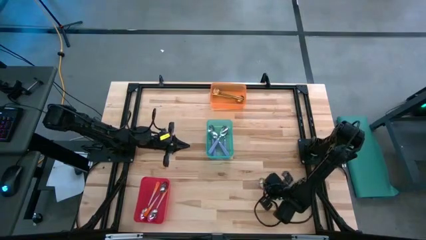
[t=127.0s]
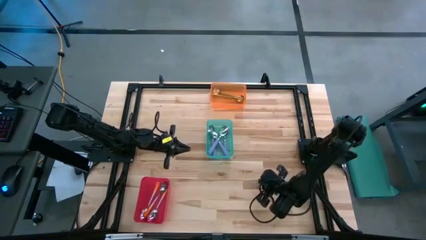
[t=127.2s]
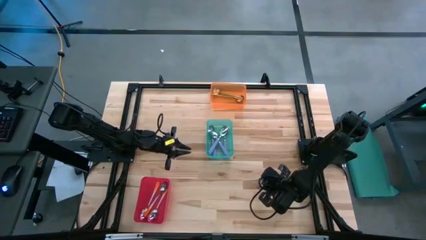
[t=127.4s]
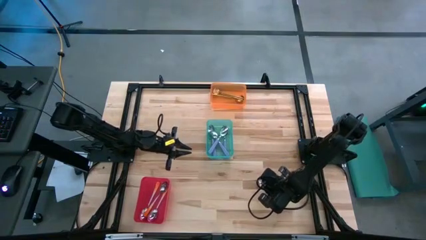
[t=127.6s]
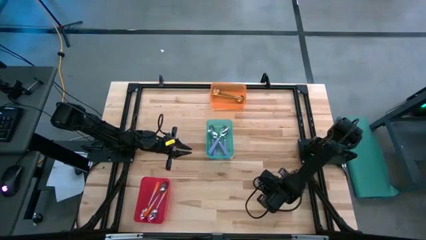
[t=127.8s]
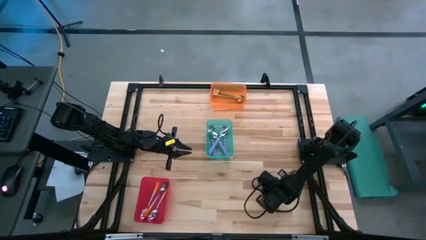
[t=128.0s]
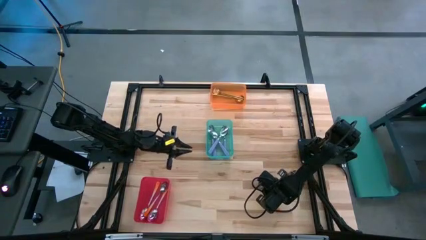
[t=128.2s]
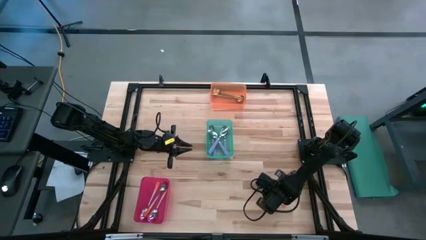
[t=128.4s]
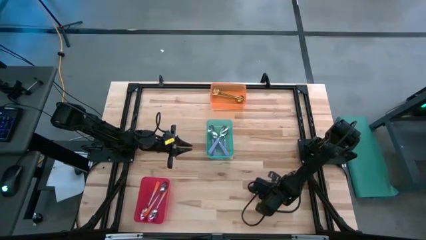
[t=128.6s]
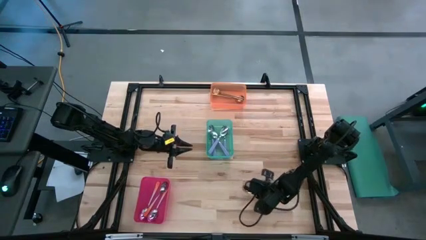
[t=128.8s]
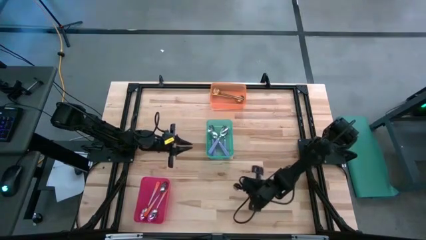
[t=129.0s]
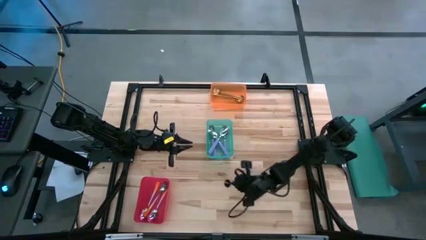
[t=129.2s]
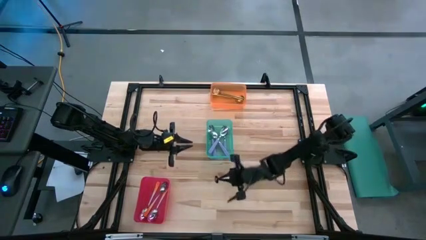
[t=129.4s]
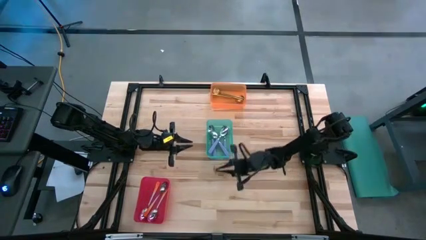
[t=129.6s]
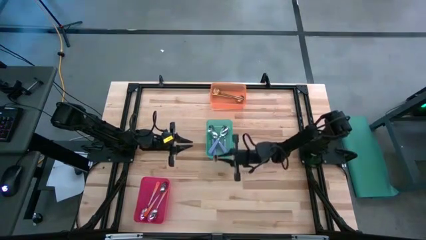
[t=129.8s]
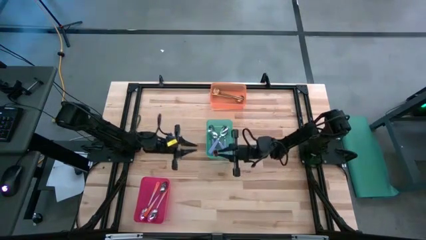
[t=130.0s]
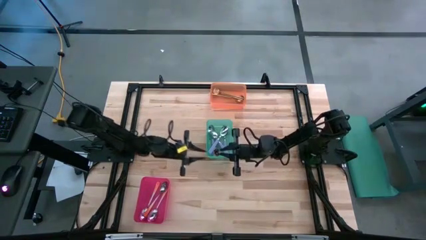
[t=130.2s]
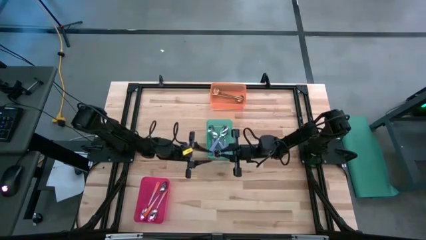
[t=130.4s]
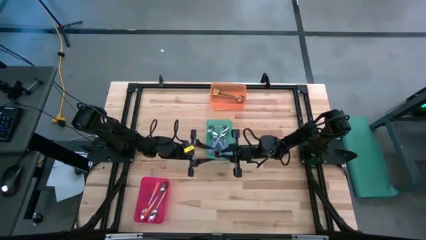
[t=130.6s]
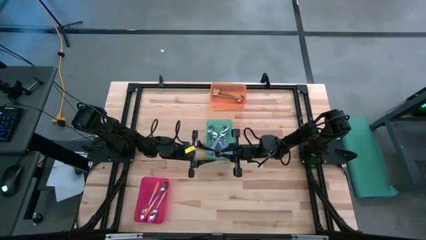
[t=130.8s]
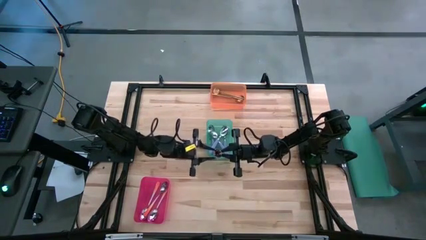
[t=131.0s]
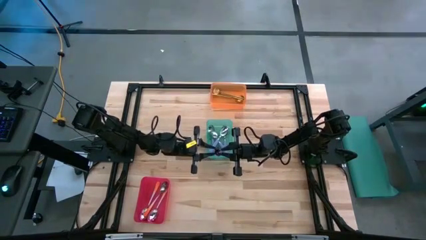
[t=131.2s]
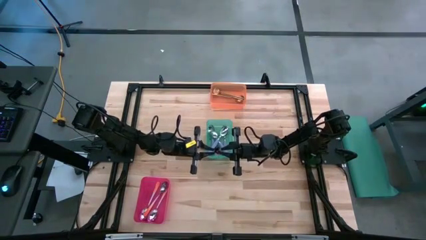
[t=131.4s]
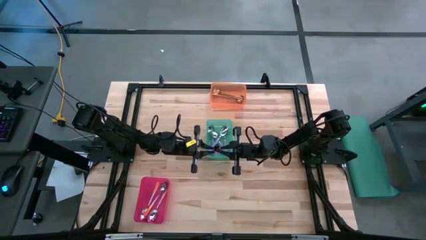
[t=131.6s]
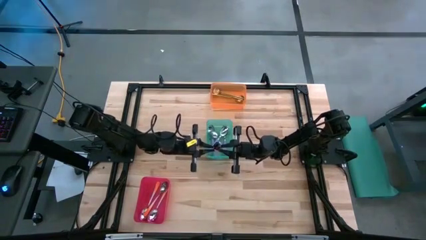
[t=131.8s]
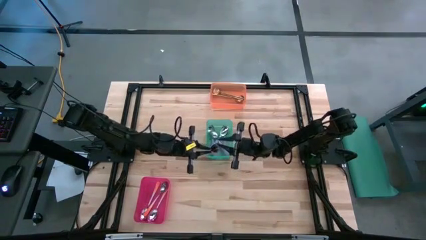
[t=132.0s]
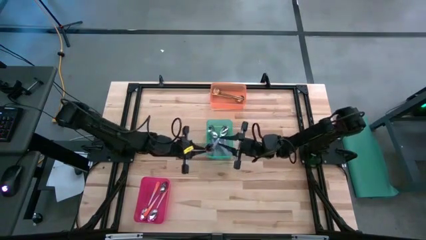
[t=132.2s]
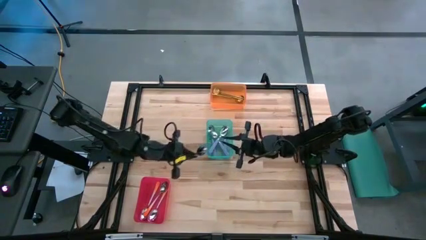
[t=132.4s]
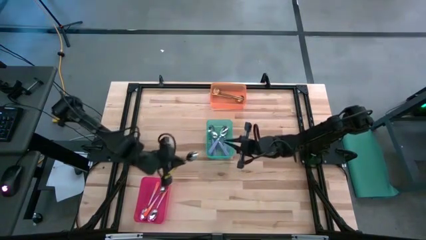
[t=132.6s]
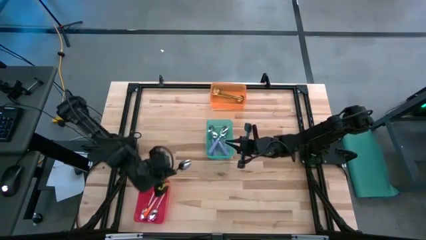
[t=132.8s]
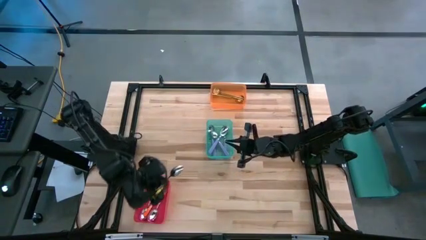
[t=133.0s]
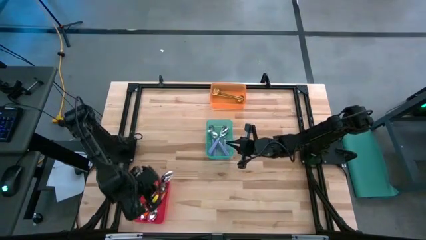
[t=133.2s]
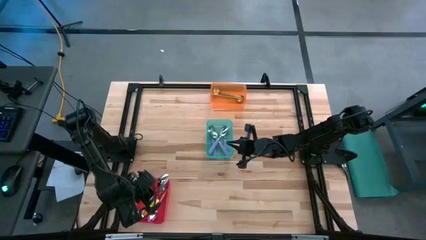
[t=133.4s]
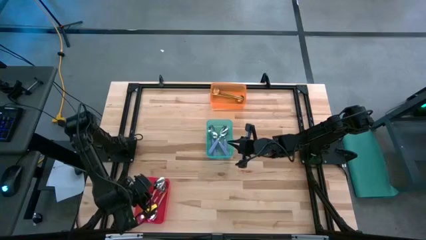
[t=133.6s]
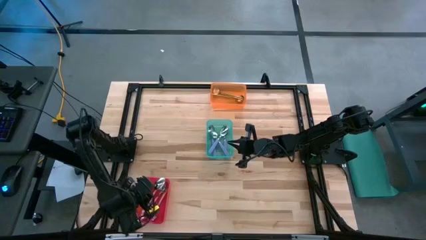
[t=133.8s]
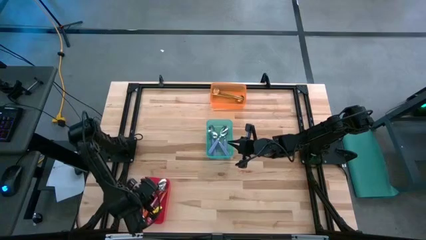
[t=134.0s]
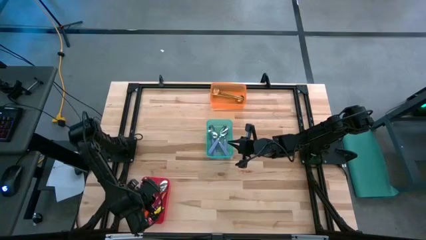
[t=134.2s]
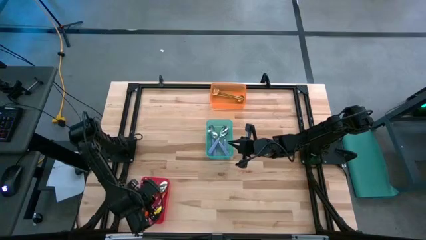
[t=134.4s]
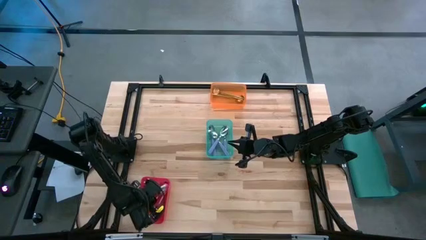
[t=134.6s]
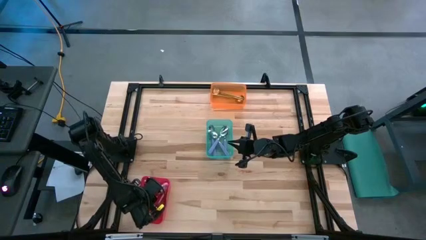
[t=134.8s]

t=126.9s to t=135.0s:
Task: Sort silverware by color (type)
Put the orange spoon into the red bin

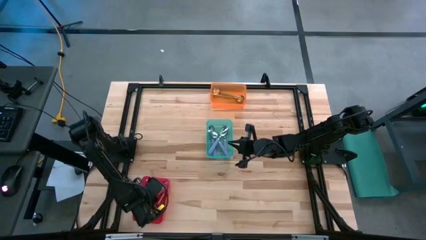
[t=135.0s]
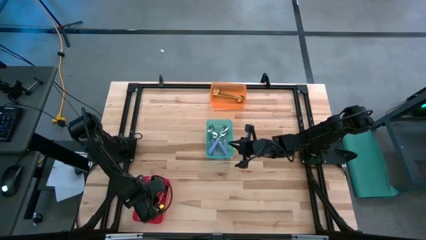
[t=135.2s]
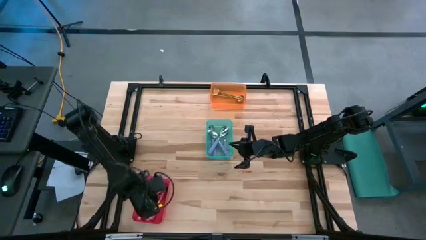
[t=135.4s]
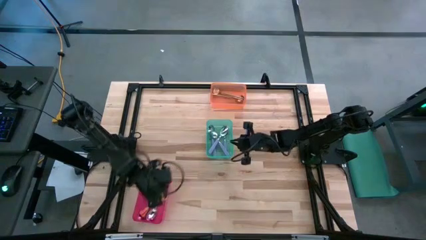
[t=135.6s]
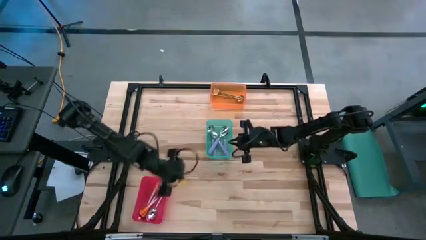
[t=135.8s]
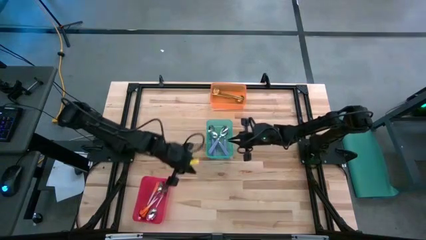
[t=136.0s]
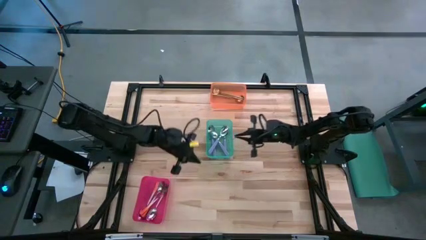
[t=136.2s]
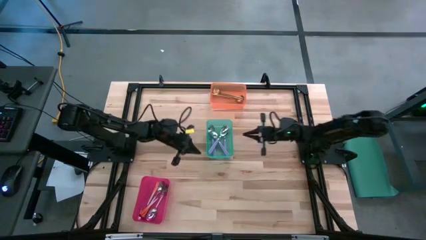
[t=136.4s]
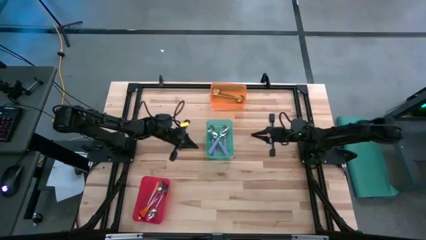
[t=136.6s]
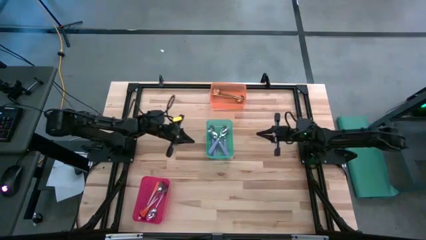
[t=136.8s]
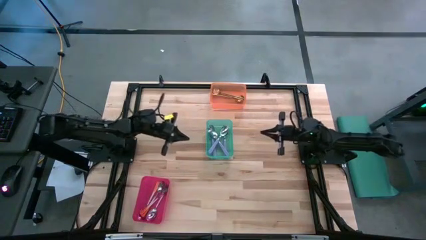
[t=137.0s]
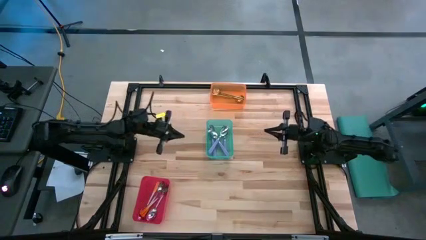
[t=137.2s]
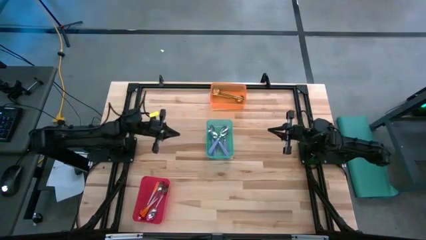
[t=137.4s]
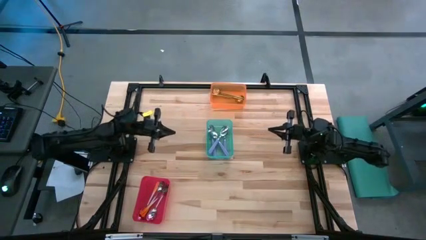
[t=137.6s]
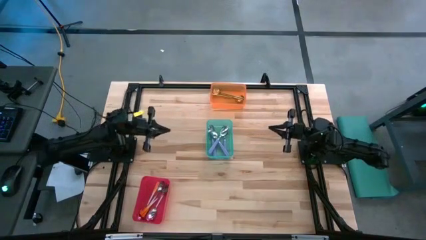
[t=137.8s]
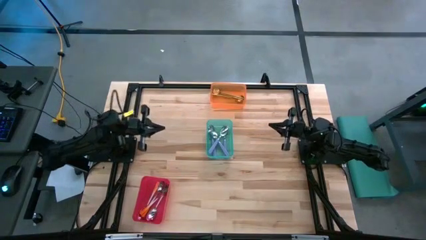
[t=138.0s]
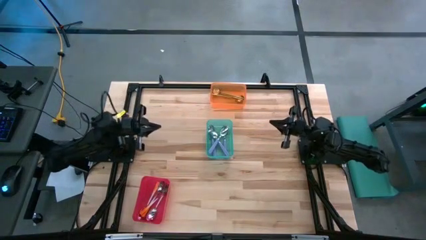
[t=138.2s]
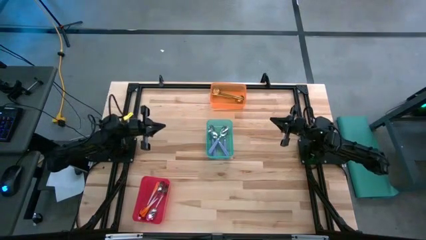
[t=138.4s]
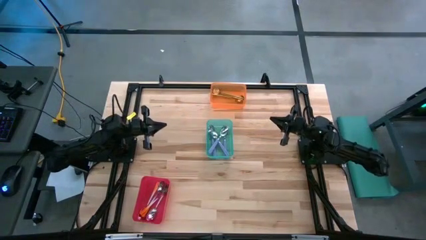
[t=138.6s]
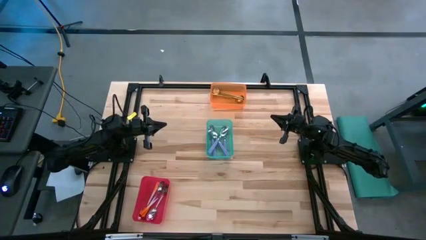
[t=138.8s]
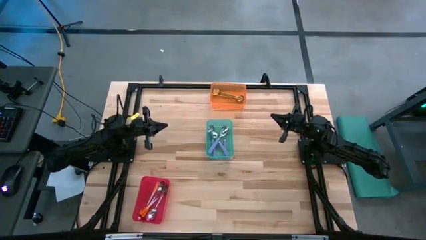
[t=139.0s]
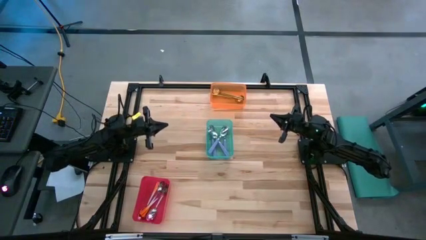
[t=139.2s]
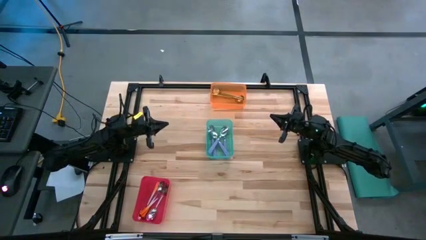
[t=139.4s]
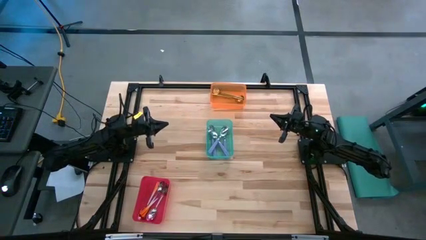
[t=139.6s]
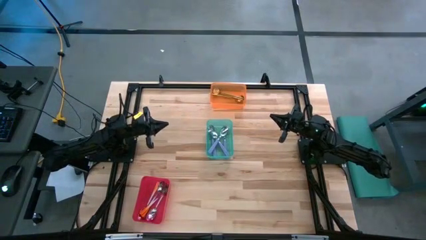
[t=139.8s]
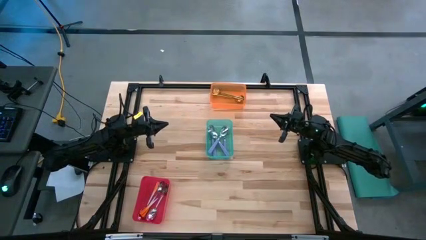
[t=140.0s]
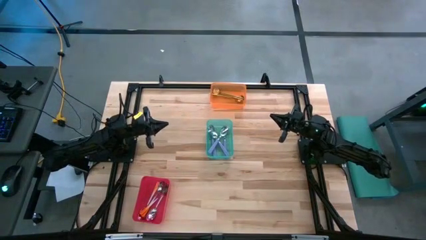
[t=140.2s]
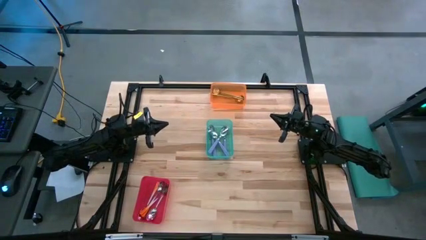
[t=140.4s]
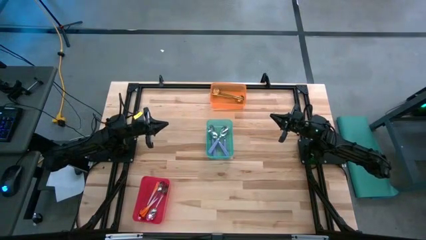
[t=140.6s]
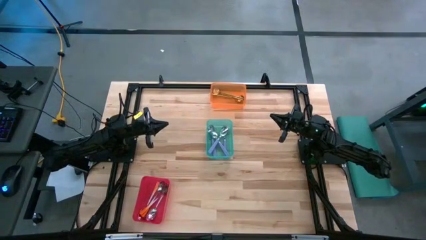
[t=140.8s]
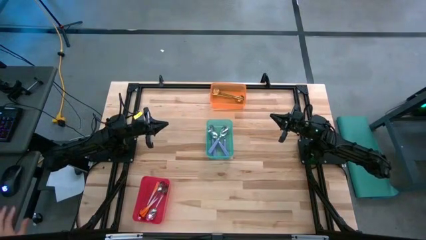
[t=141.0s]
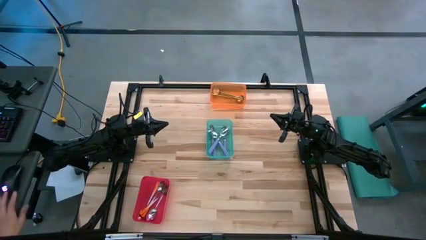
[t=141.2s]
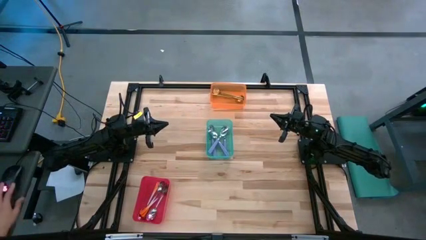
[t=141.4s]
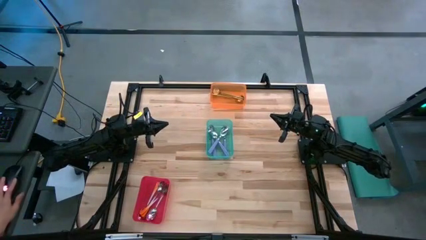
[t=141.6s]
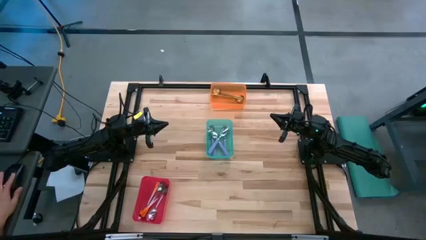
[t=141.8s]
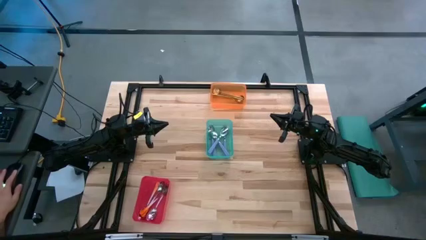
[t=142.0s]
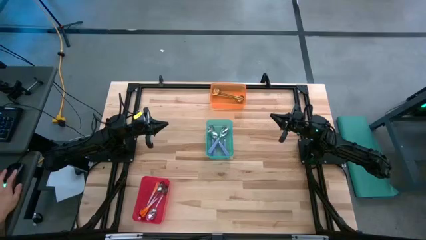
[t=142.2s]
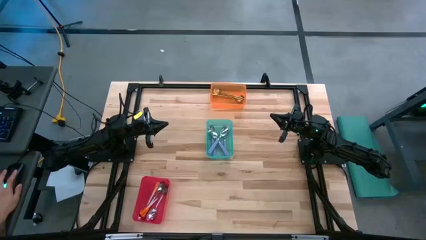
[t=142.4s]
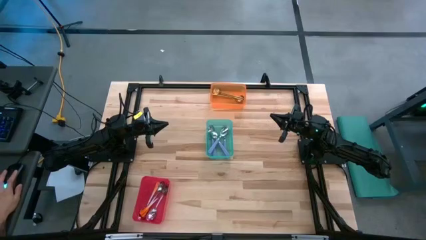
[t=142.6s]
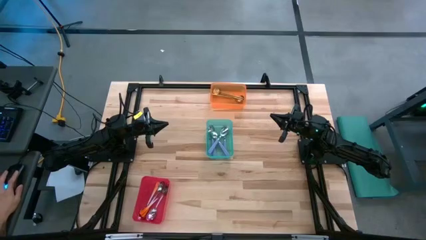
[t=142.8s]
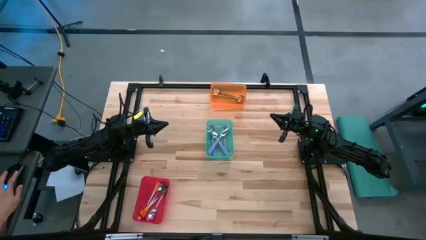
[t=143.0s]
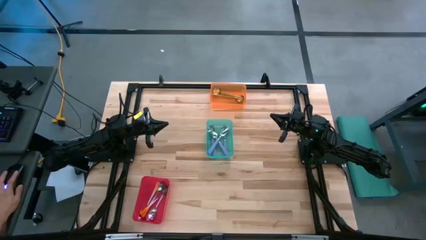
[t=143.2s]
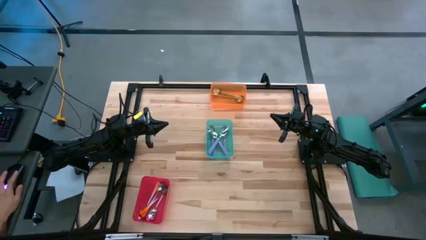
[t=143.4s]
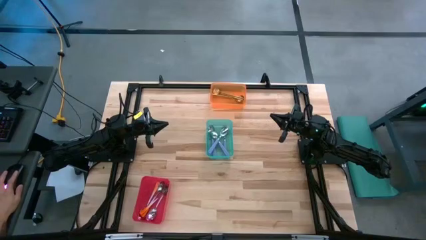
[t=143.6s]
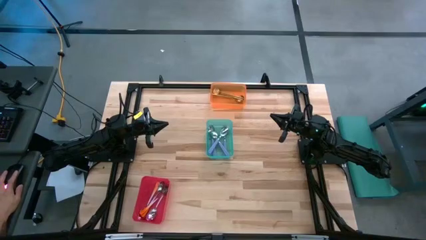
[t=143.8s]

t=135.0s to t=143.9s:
Return to Home Position
